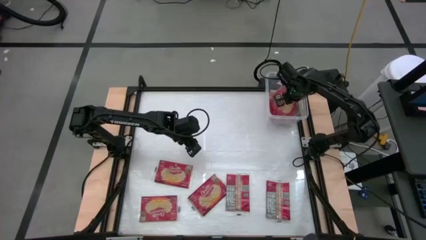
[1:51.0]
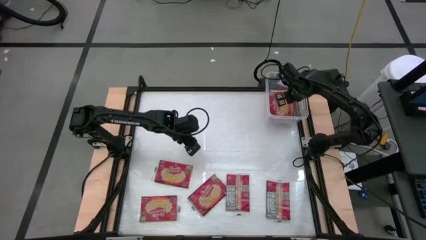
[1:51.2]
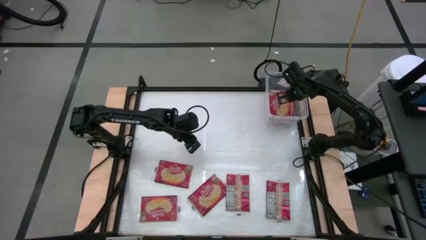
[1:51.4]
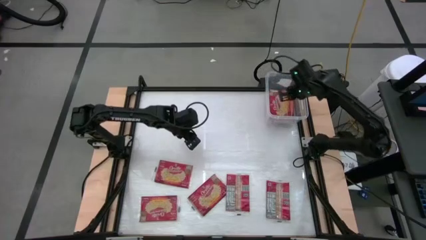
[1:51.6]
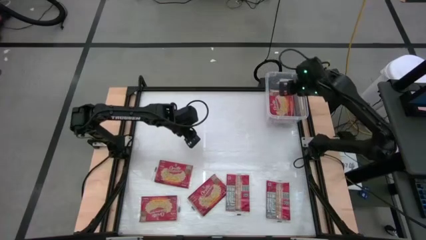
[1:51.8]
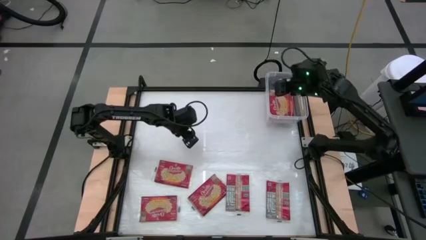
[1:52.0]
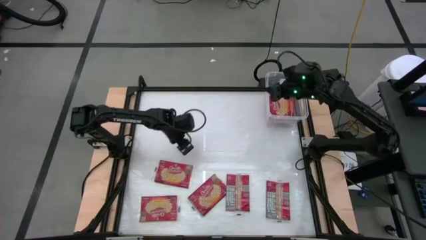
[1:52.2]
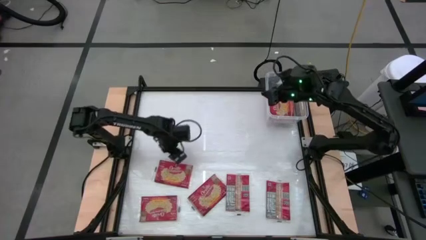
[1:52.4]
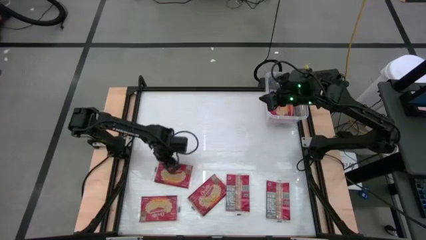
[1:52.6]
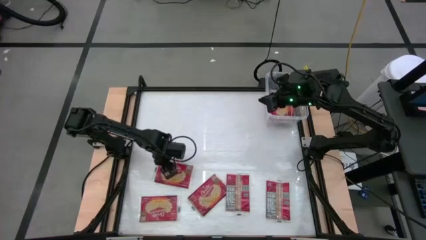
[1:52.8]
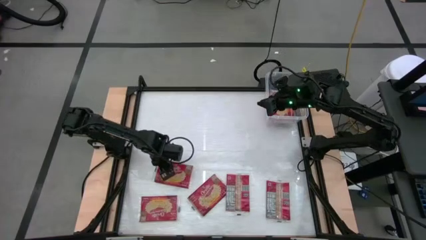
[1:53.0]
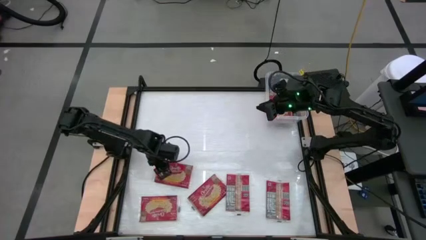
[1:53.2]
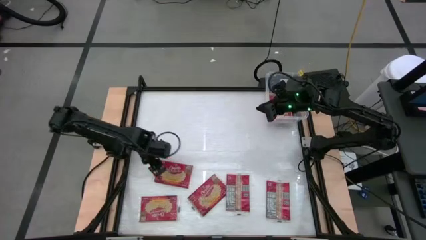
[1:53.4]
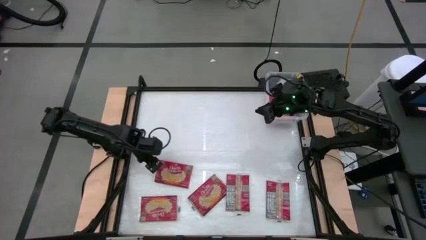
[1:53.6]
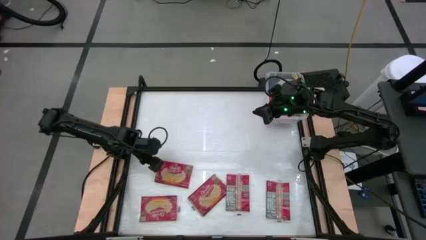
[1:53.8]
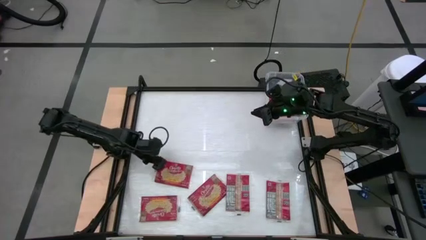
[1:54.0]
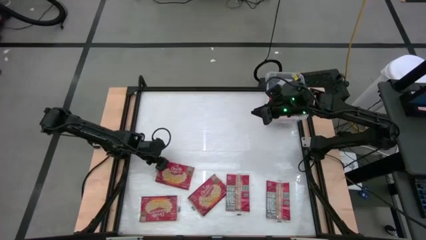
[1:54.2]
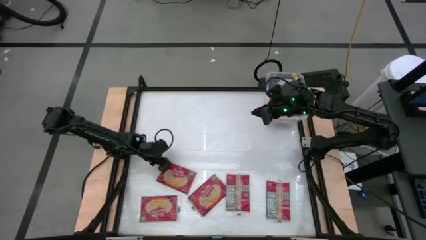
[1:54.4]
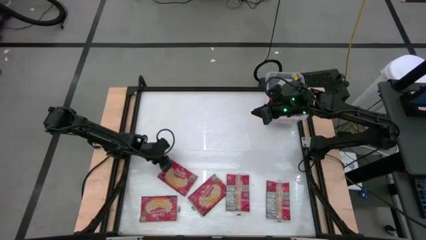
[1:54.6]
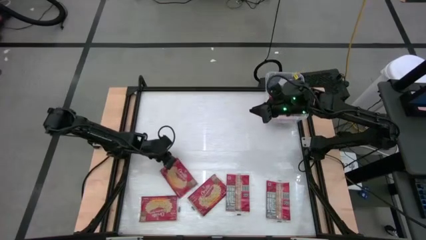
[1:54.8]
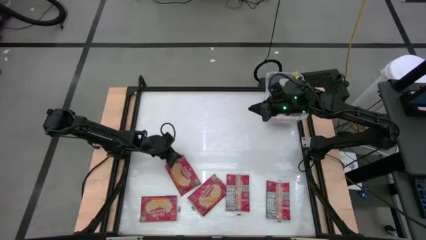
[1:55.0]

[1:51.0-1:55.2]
Task: Sort popcorn bags into baskets
Put the red popcorn bag into the transparent container

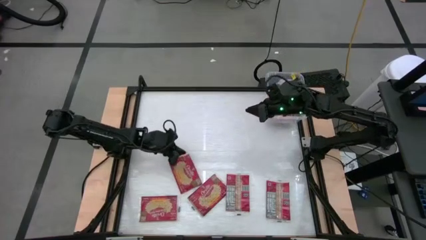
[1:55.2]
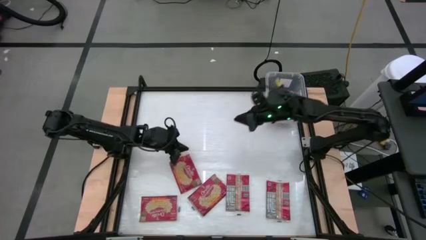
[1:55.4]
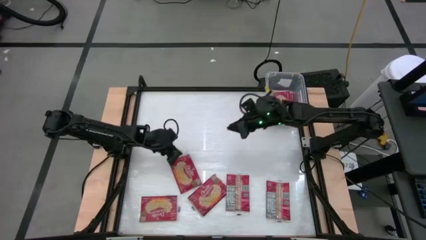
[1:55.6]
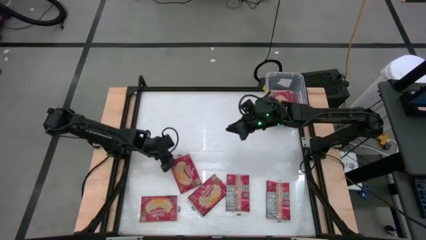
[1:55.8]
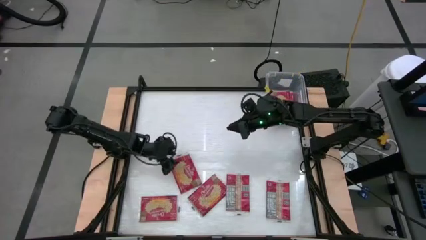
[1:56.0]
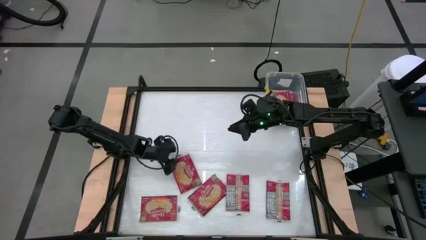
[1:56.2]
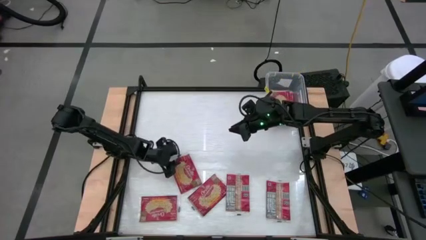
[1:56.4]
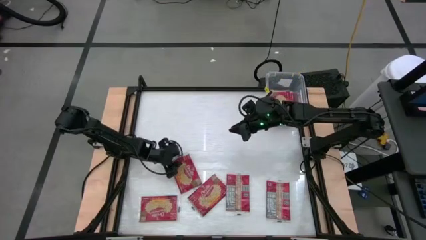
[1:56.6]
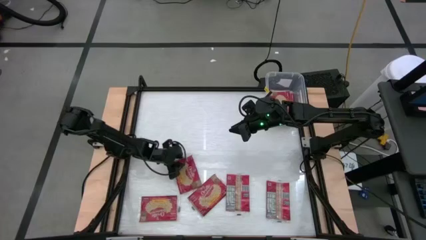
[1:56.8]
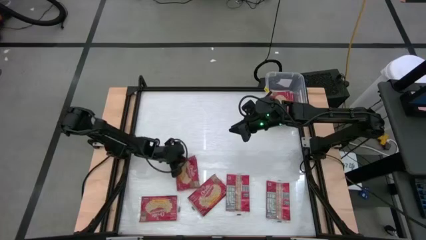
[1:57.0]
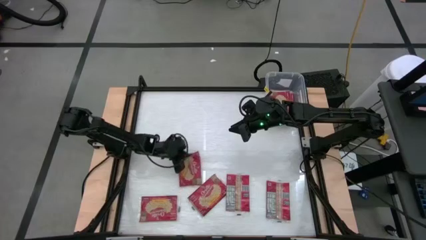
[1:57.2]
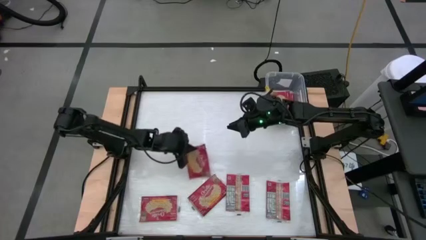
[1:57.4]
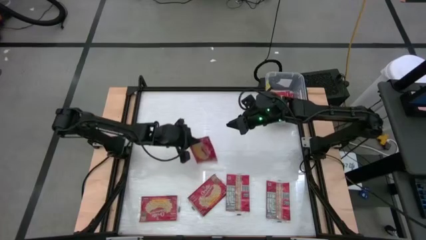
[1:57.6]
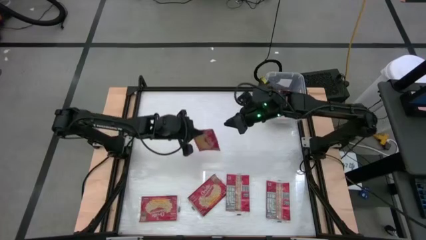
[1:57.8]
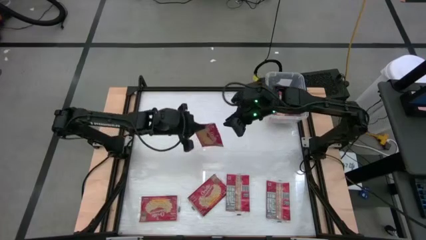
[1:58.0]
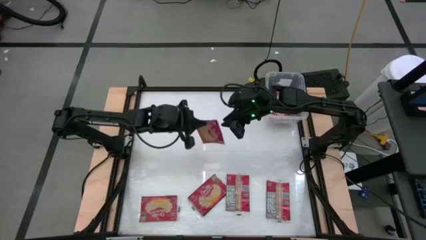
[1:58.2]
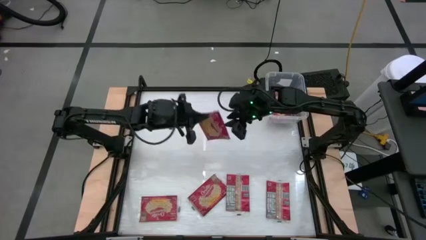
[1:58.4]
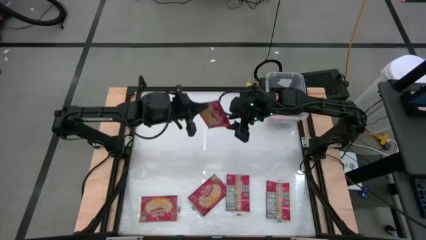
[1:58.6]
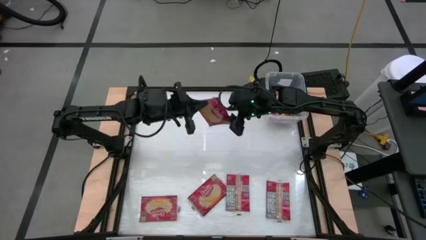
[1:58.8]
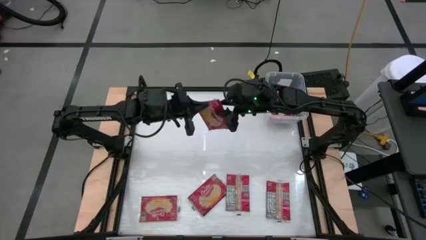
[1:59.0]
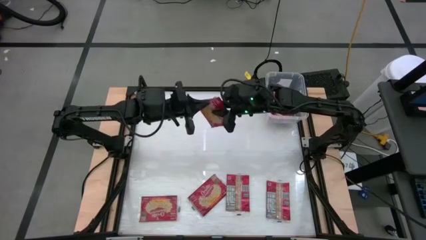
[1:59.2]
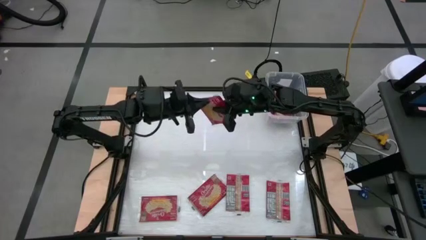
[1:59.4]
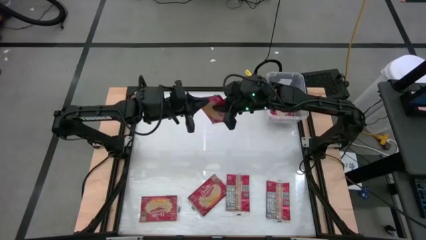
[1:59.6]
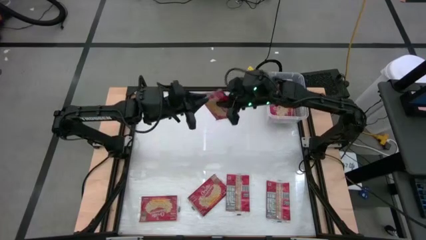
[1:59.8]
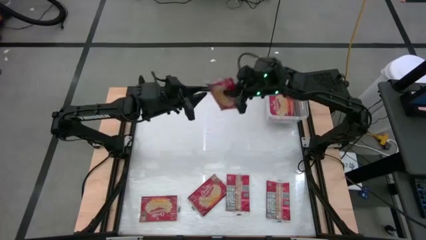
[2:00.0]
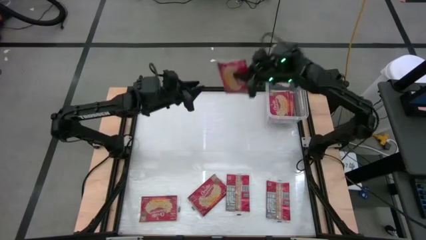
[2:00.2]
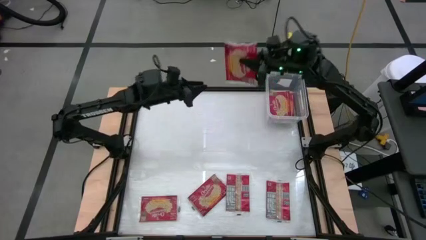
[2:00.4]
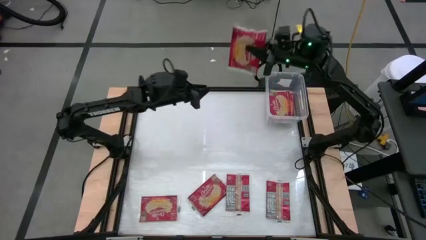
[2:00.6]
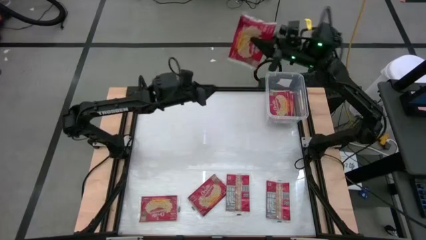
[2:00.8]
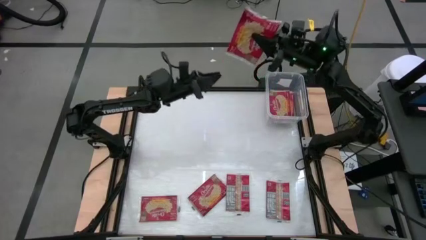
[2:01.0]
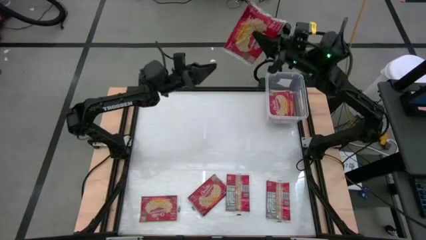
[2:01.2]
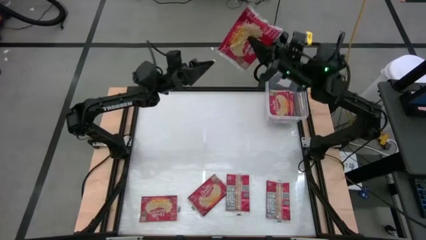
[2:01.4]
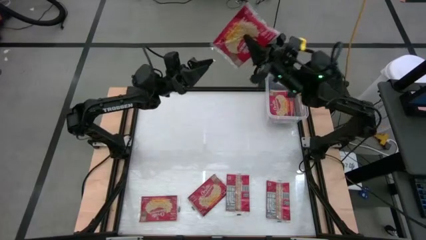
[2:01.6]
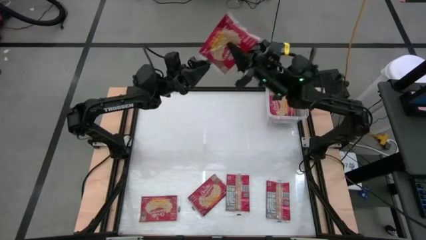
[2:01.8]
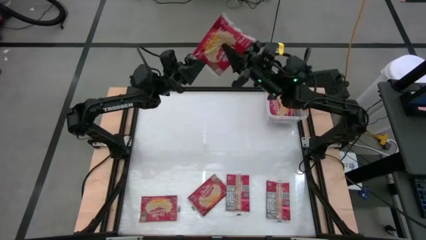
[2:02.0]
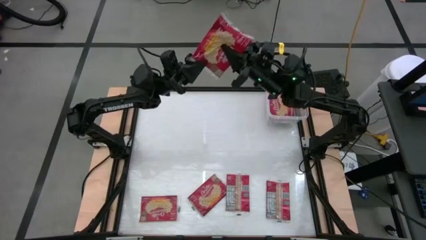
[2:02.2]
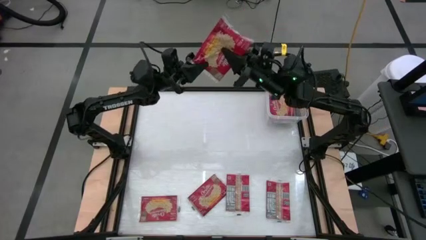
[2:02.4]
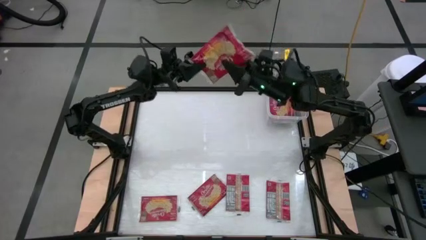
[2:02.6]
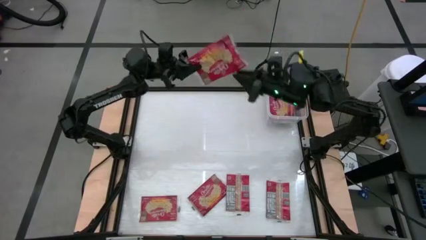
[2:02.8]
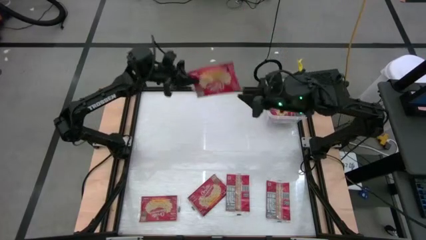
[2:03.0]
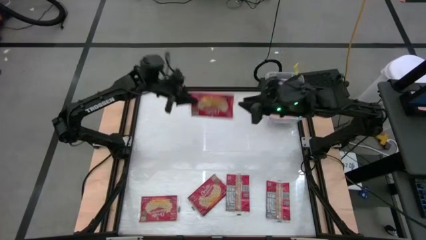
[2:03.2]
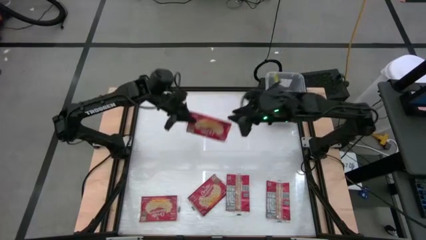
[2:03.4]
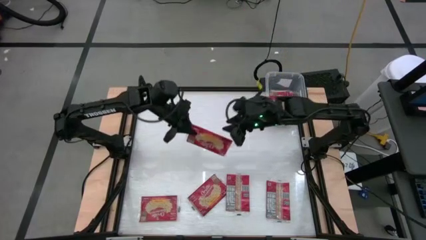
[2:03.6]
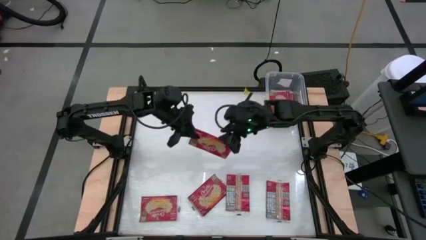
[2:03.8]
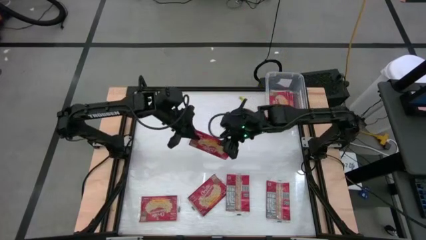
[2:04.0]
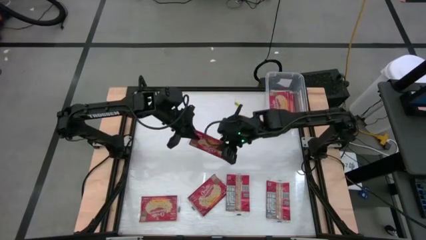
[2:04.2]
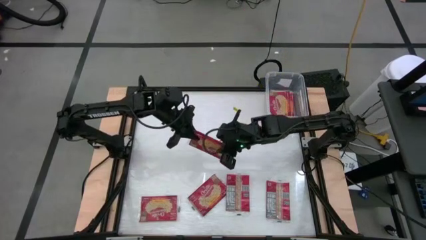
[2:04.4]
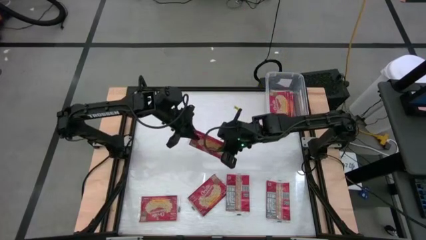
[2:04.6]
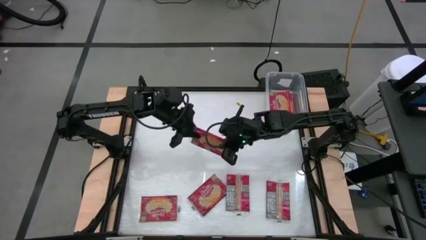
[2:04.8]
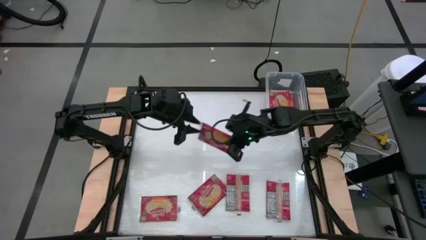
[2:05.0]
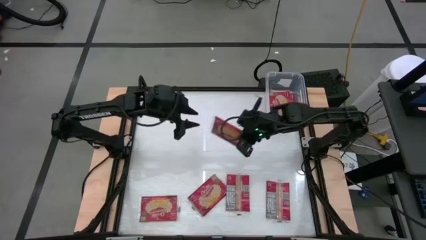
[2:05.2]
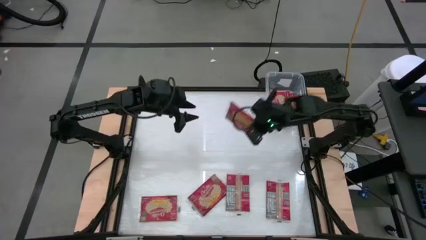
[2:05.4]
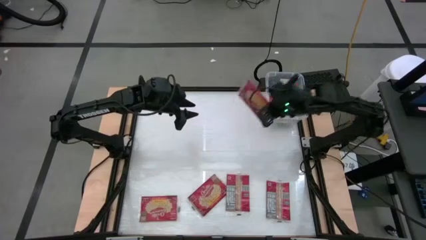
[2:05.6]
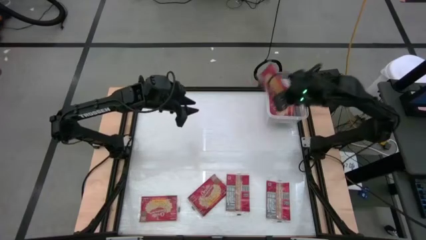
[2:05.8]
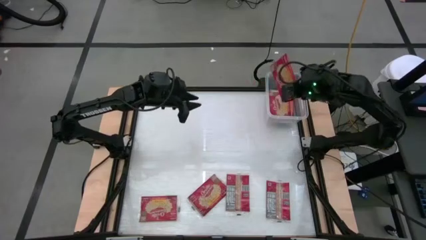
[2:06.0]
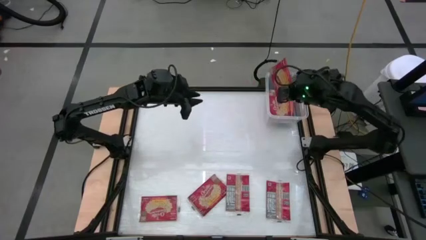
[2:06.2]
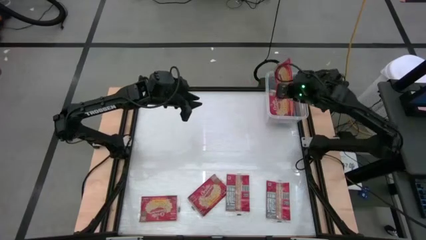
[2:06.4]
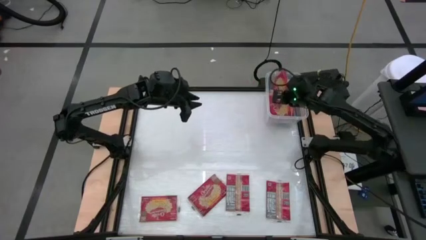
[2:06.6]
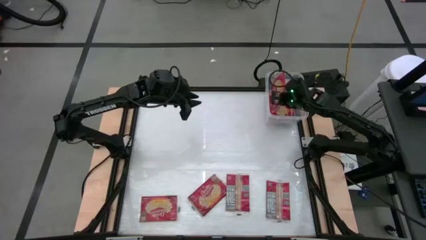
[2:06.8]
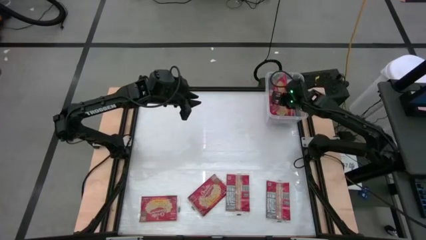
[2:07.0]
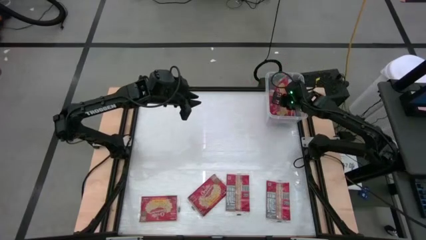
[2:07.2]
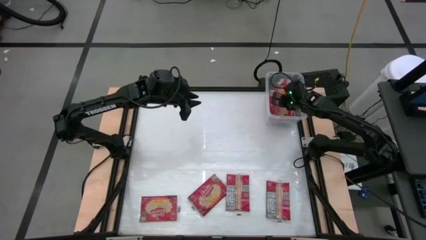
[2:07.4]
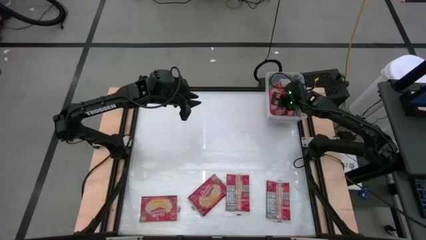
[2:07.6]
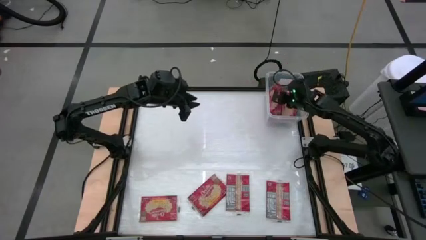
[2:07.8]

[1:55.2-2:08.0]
Put the red popcorn bag into the transparent container
